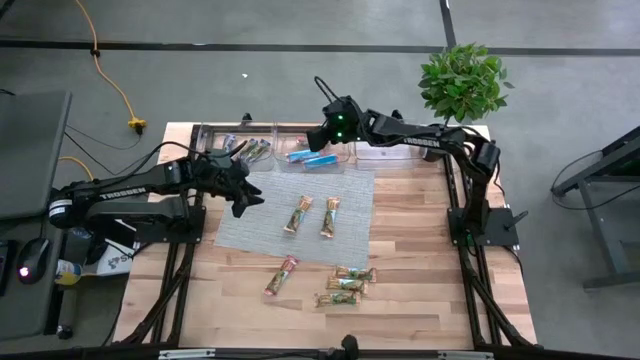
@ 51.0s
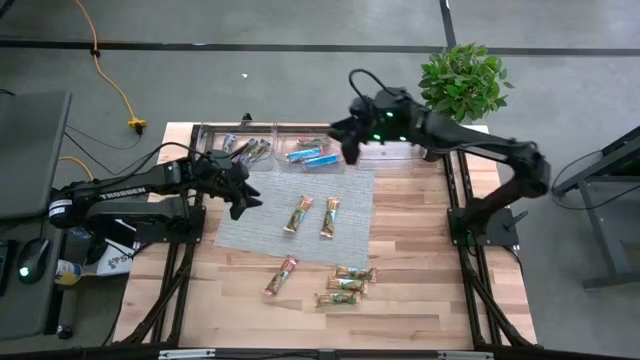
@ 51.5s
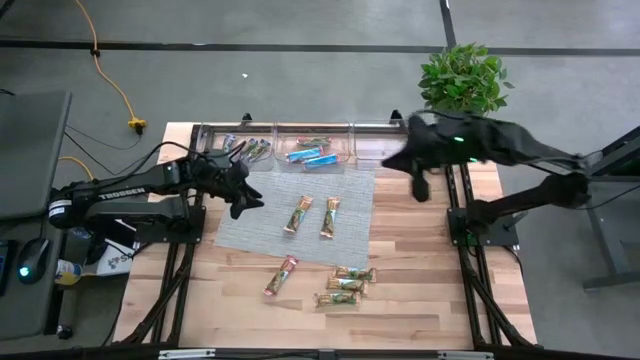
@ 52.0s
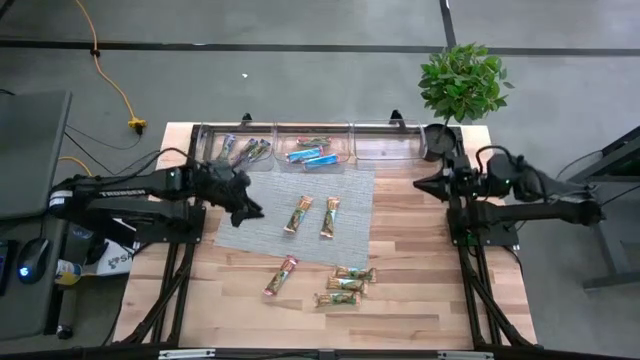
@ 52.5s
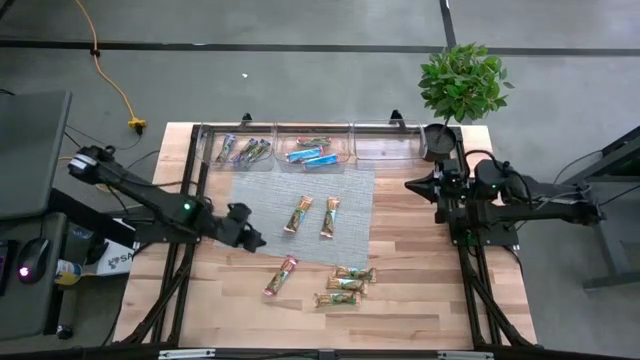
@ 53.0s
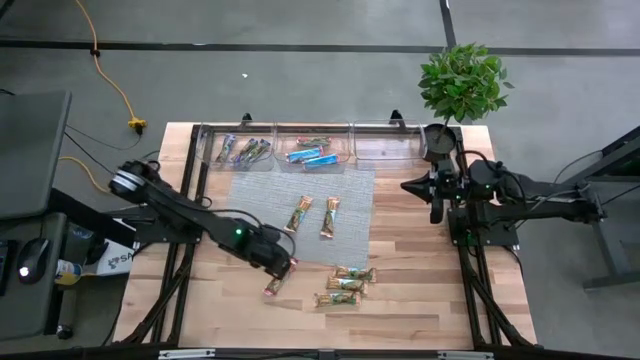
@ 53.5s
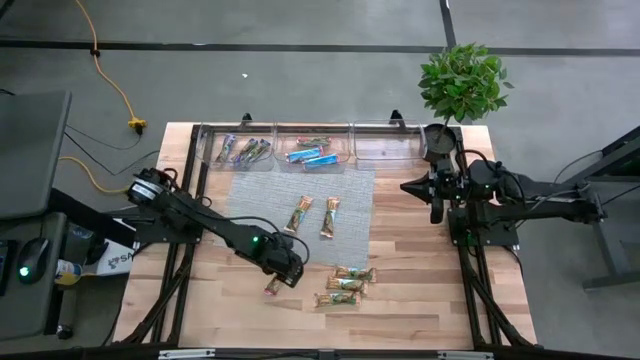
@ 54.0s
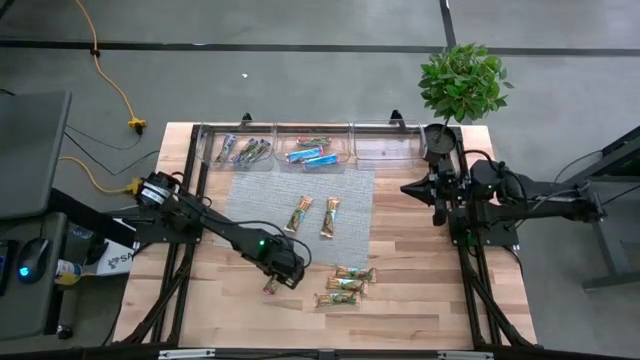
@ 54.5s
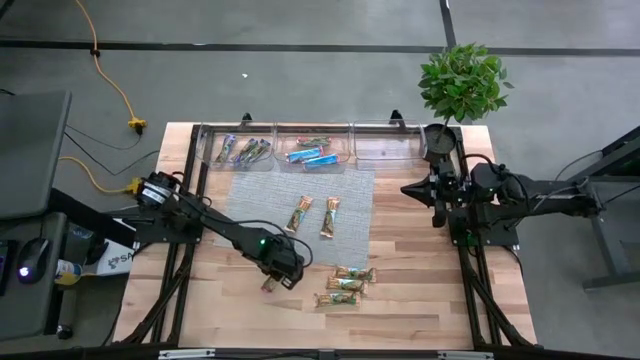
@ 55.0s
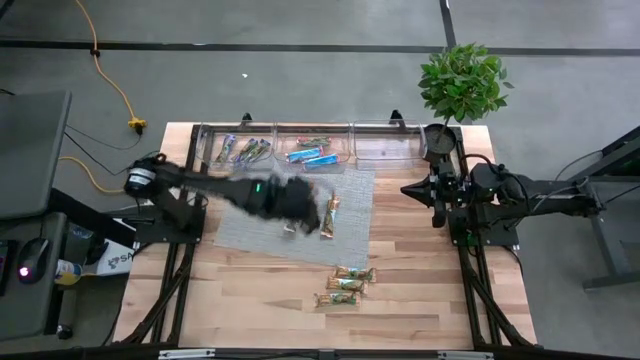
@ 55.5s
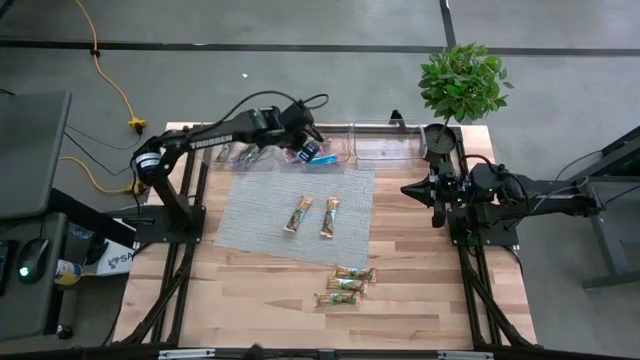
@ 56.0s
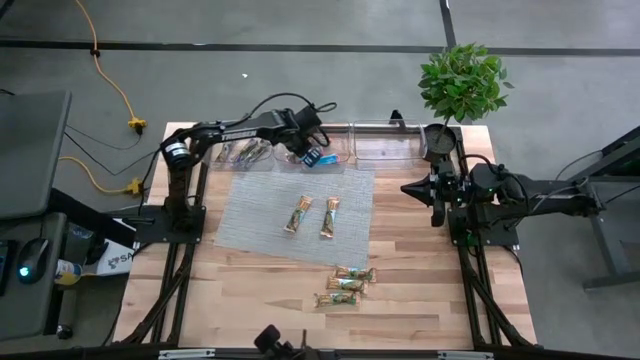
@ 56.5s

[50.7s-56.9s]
Task: Pick and place Granola Bars by type
Put the red granola bar into the middle transparent bin

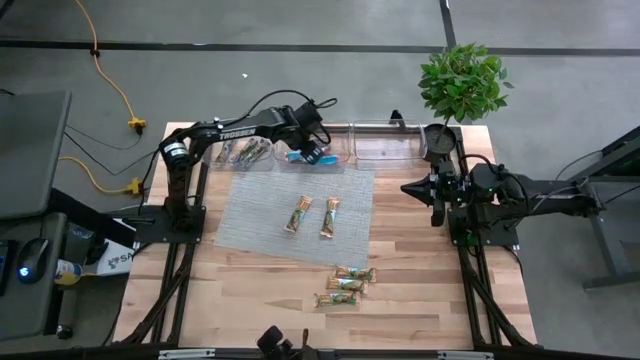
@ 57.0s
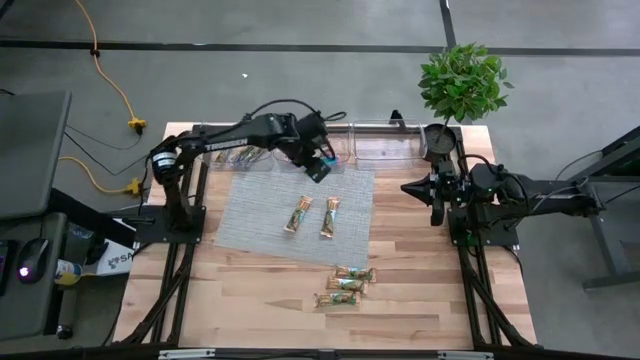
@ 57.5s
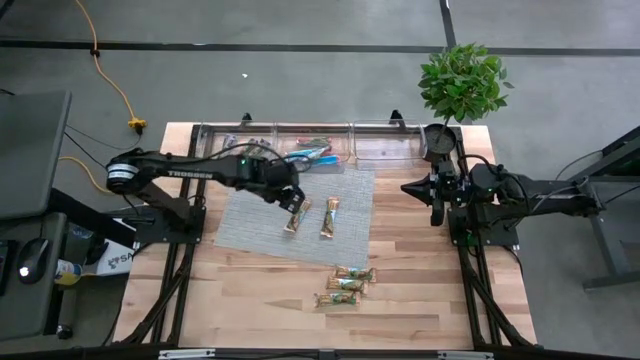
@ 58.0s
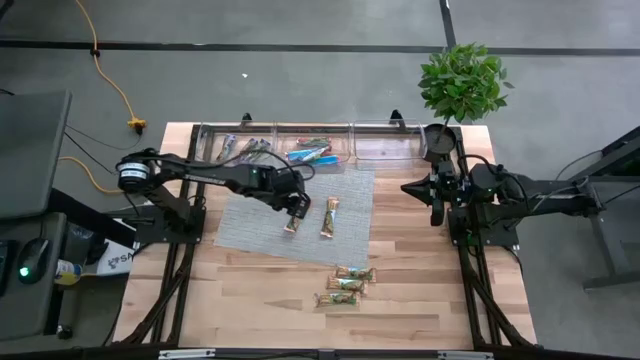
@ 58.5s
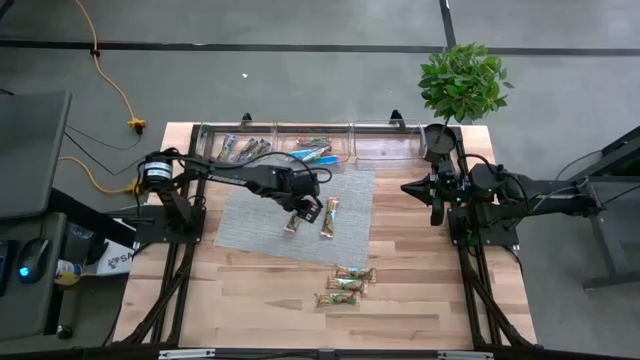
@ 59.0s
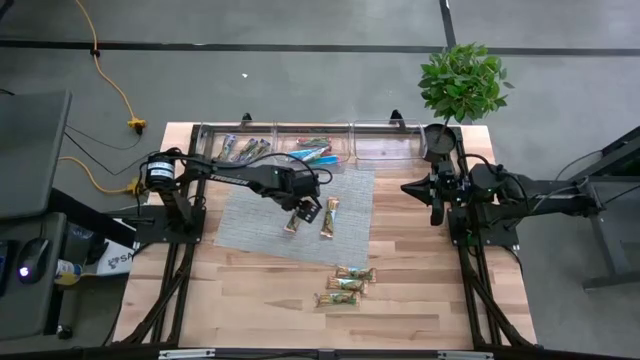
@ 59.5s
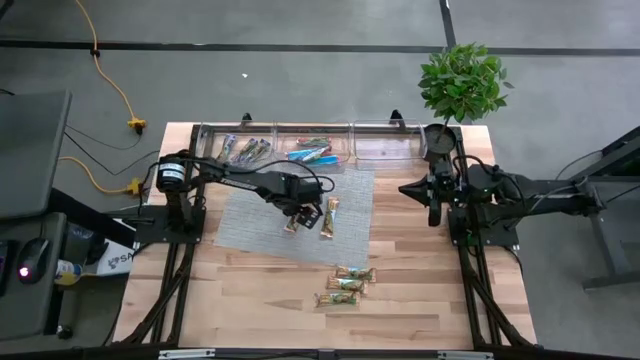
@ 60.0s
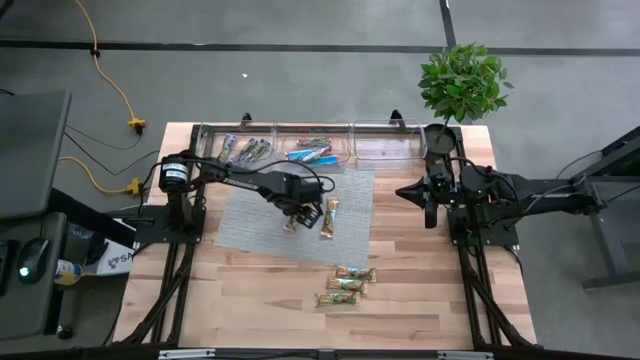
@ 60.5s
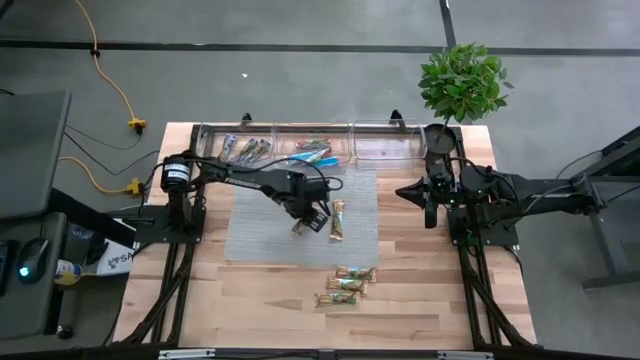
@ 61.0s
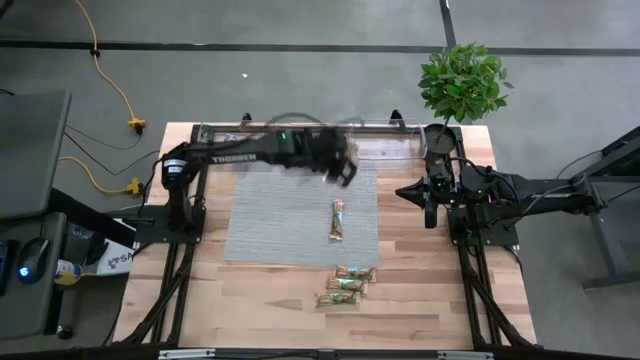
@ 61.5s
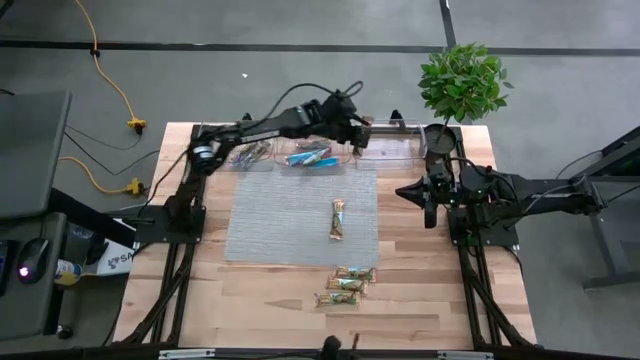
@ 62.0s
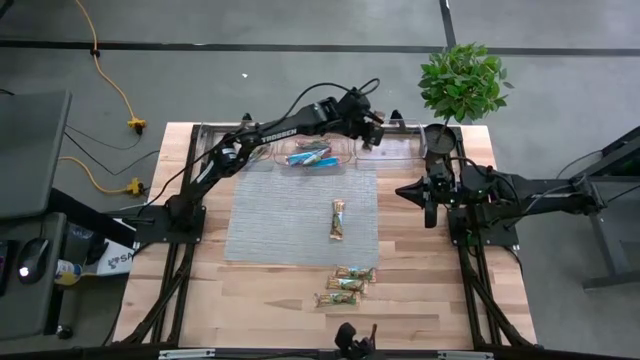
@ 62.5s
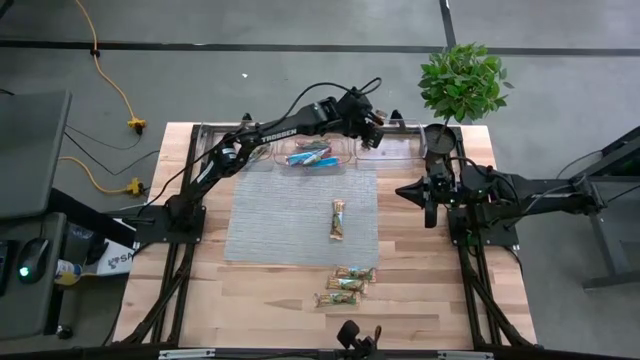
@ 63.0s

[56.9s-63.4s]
Put the yellow granola bar into the right transparent bin

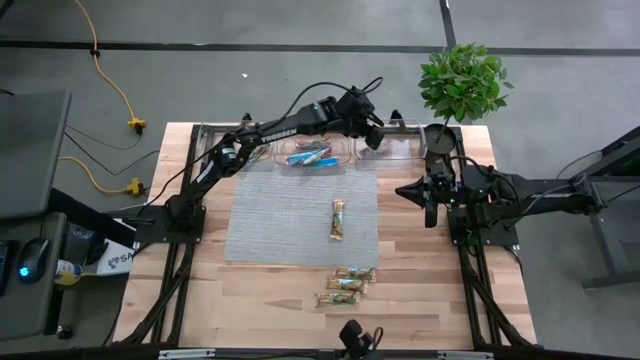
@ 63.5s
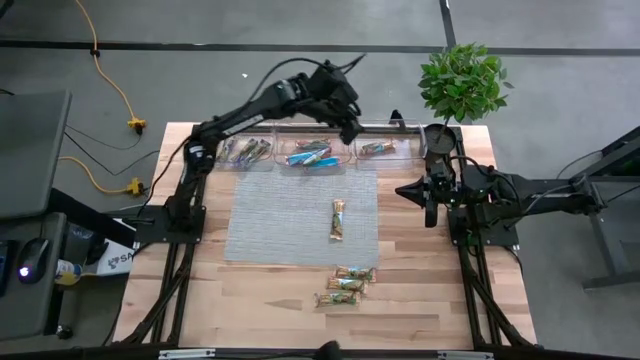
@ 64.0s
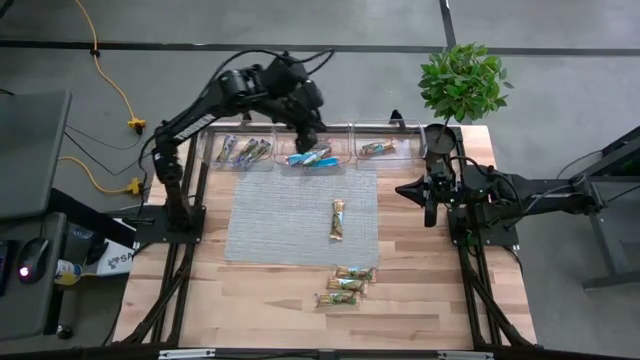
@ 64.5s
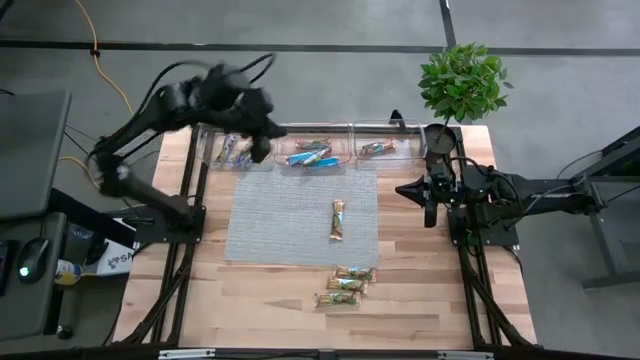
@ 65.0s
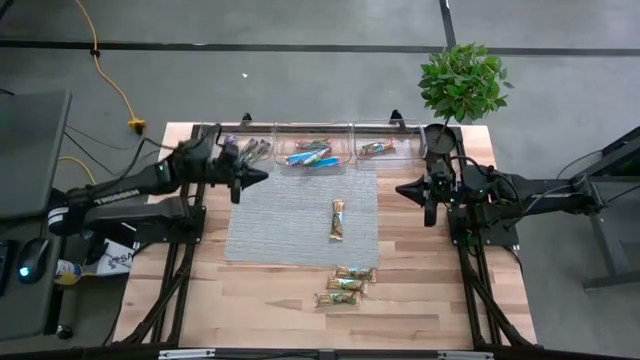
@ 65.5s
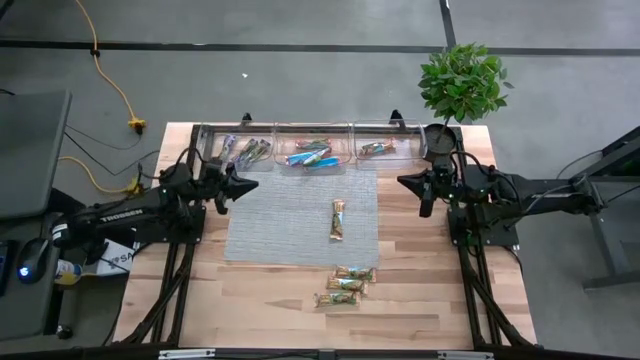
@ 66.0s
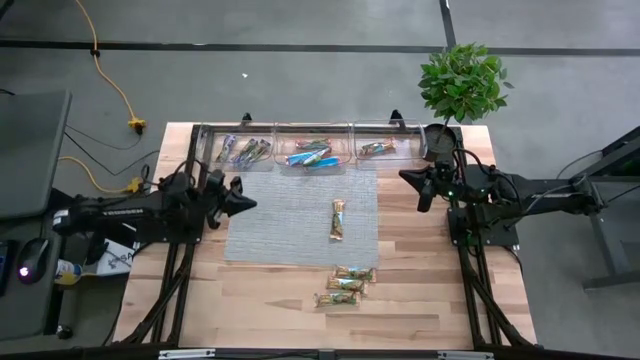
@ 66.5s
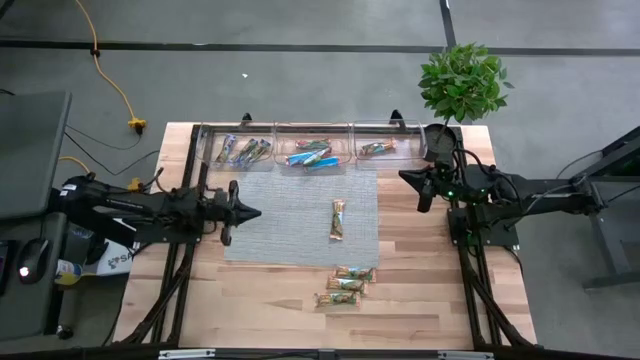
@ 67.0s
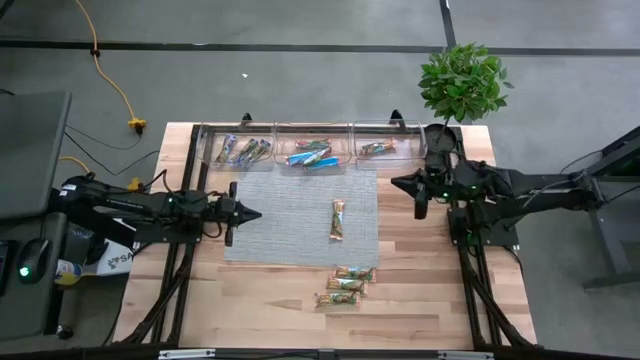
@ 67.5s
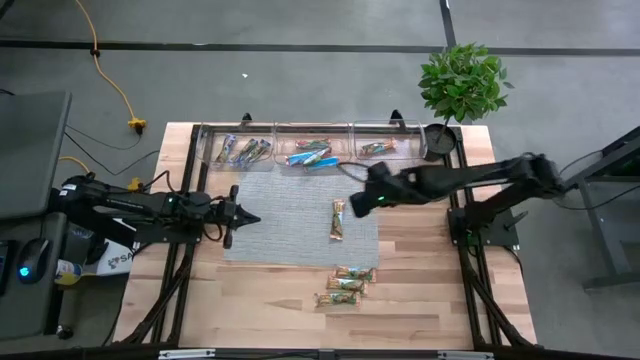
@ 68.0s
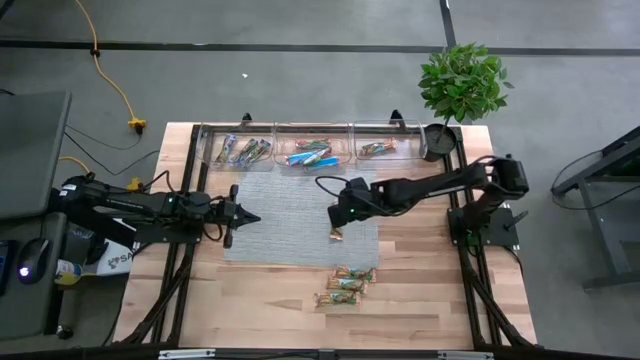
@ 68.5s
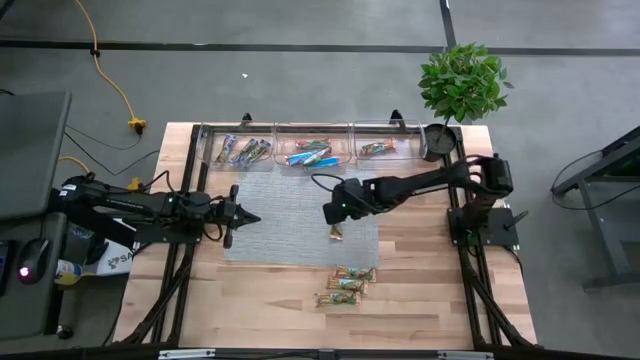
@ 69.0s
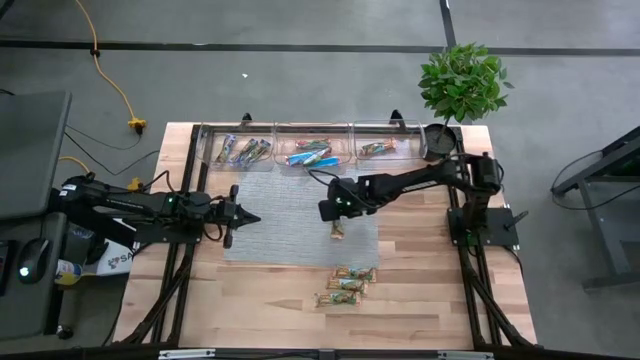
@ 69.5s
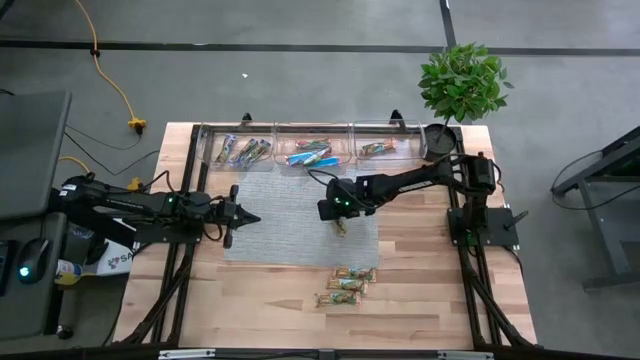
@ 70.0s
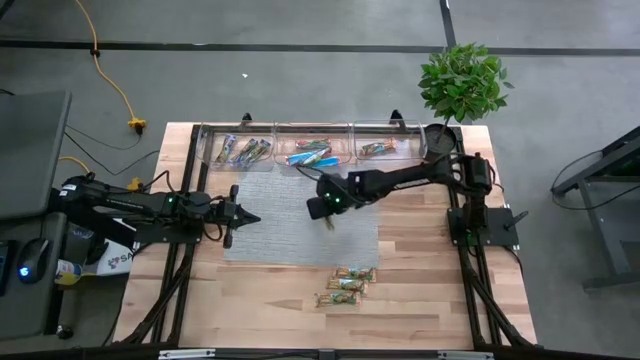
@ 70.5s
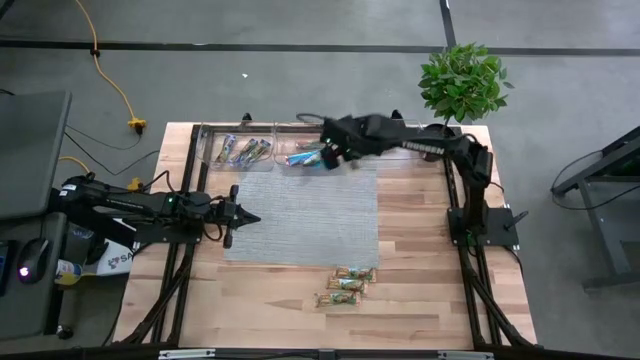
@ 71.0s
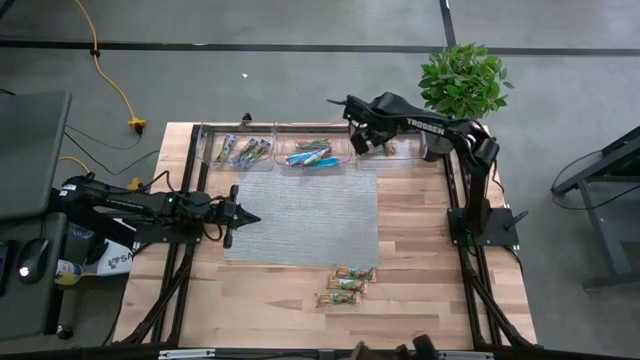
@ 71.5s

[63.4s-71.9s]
Put the yellow granola bar into the right transparent bin

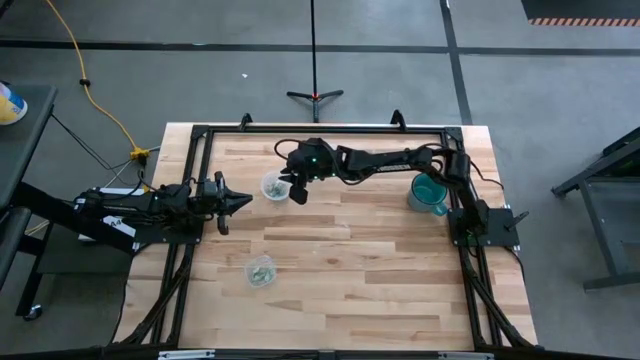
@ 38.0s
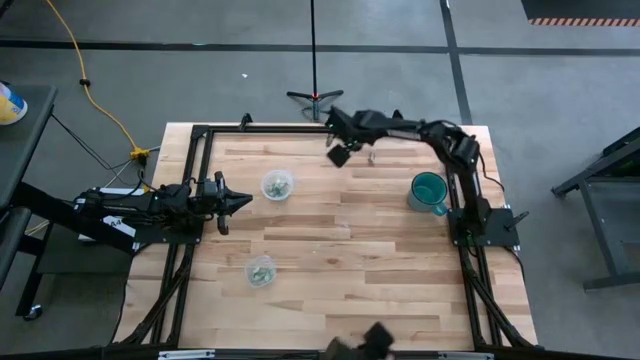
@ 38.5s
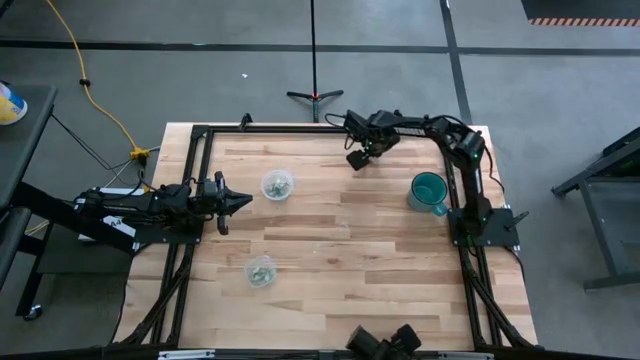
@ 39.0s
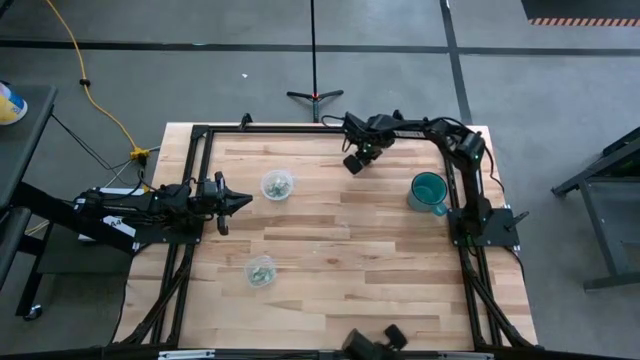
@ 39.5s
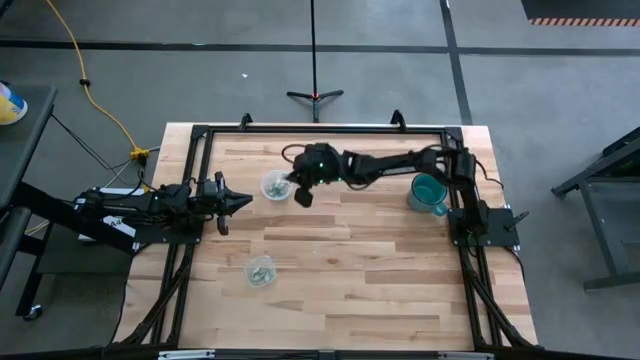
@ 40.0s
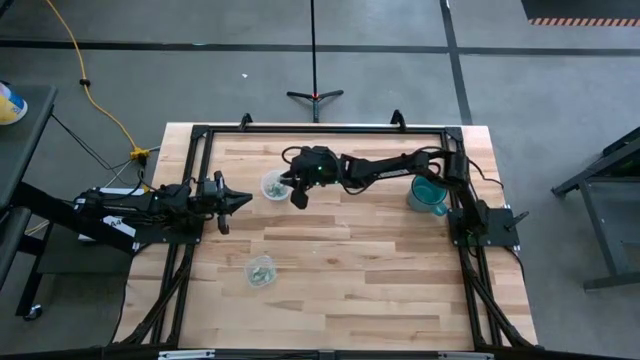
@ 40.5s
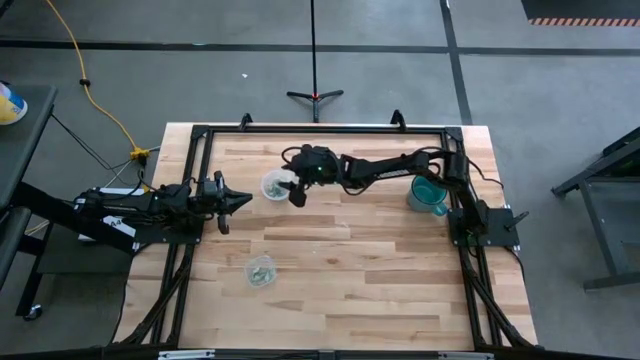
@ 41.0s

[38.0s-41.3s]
Task: Pick and place items into bin
Put the white stevia packet into the top transparent bin
